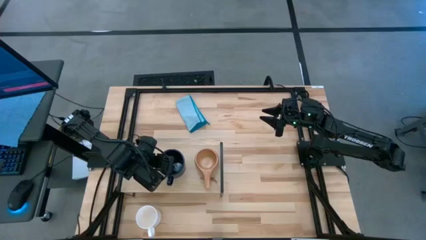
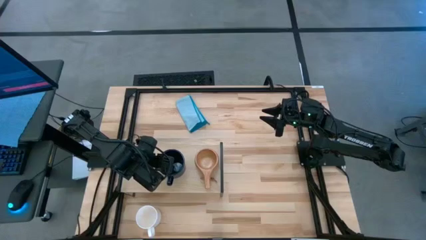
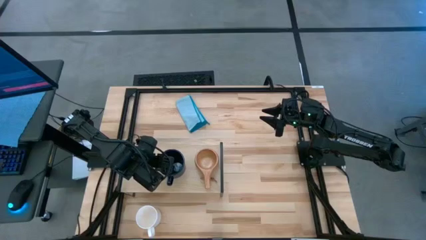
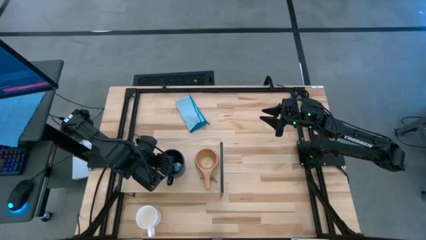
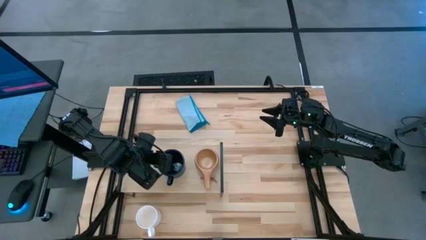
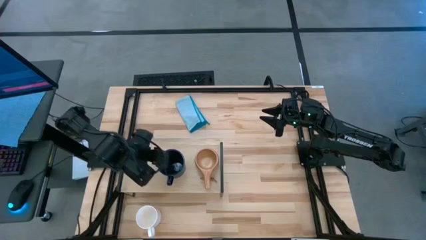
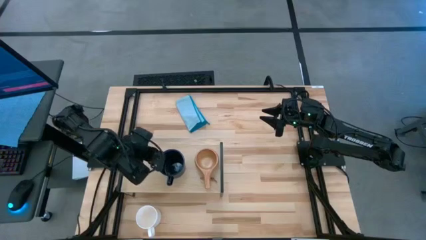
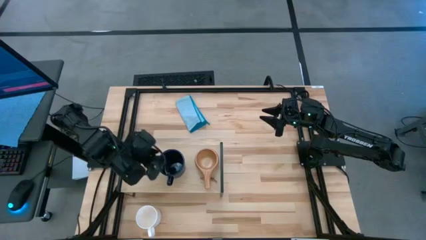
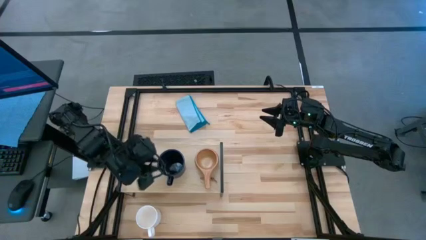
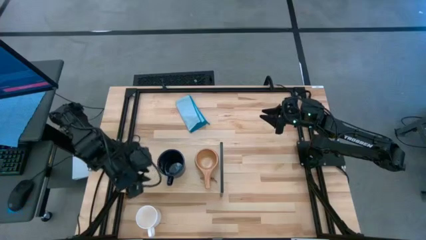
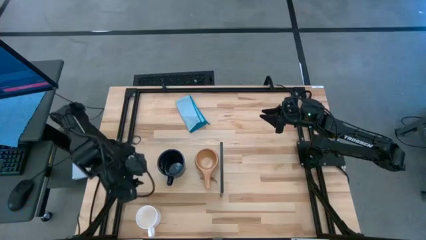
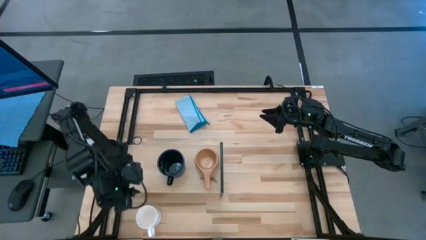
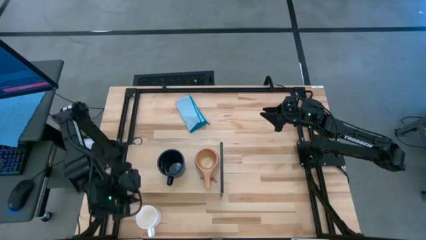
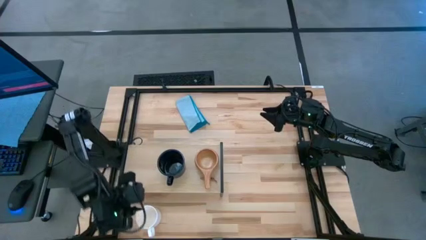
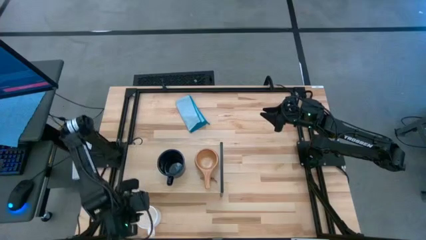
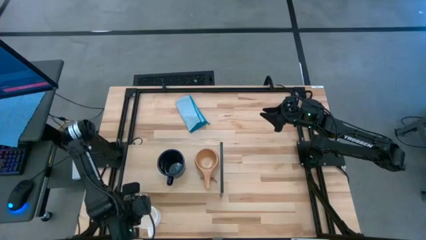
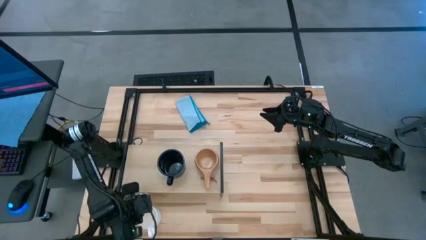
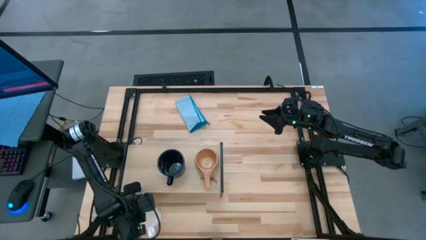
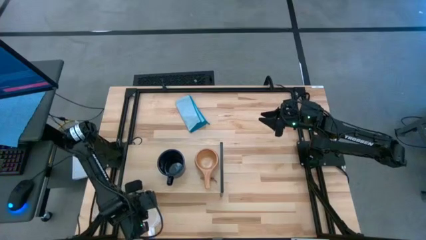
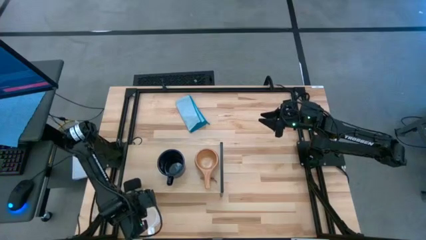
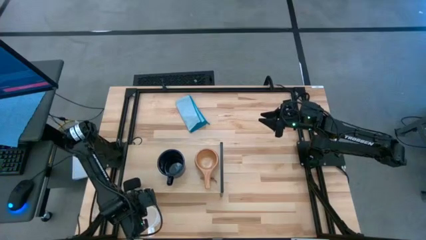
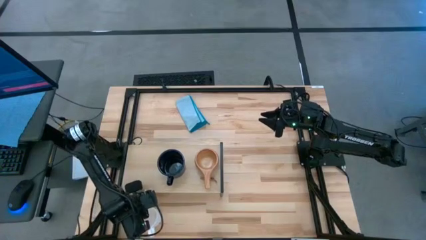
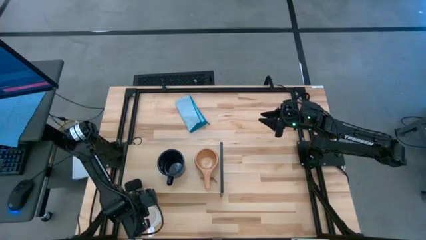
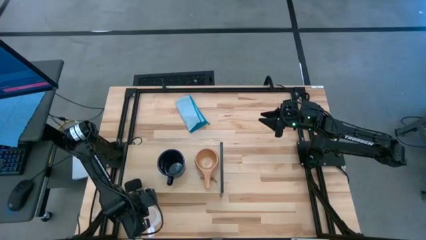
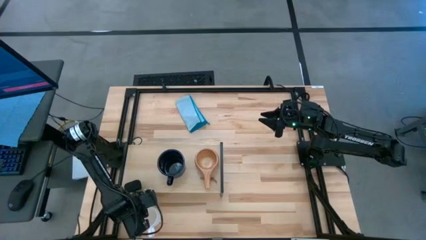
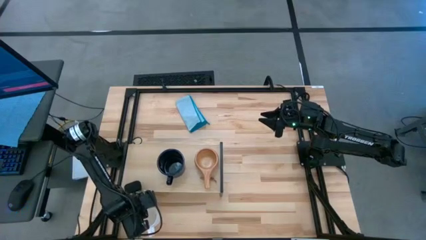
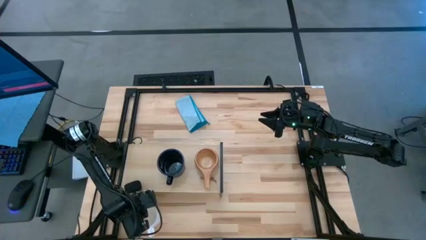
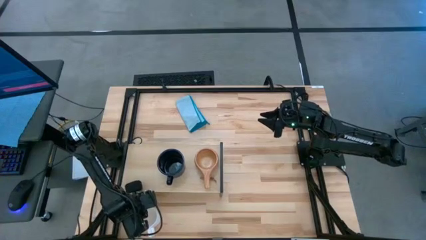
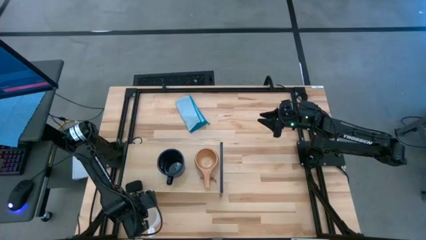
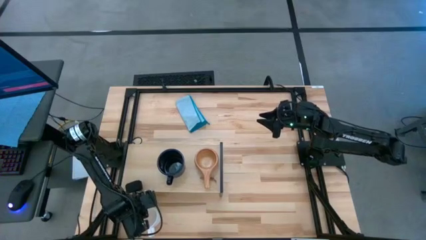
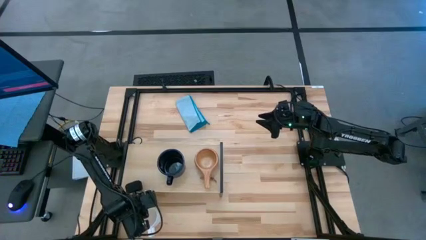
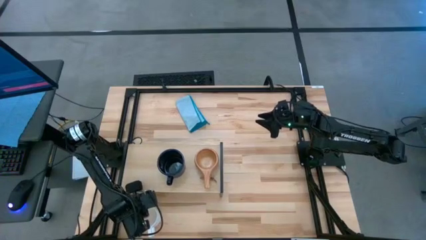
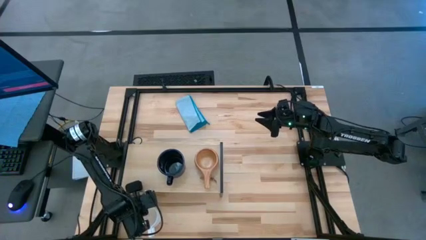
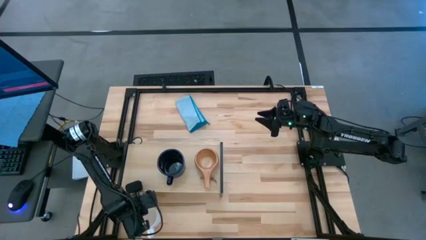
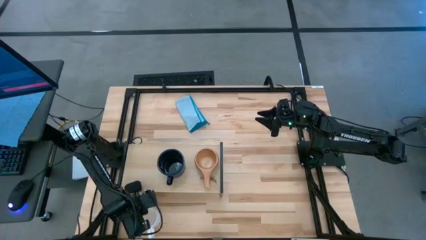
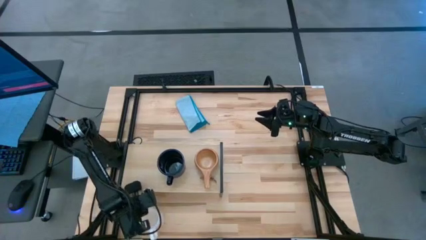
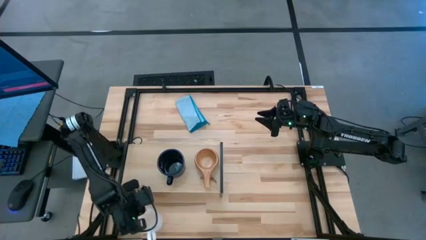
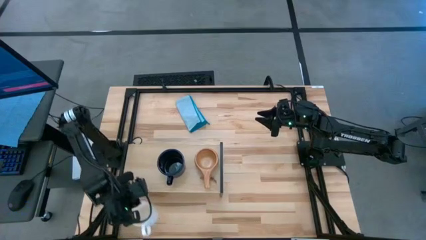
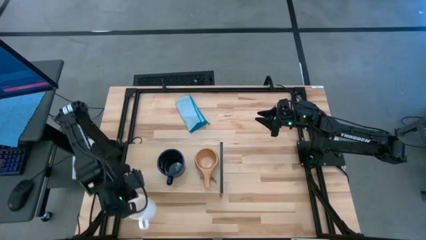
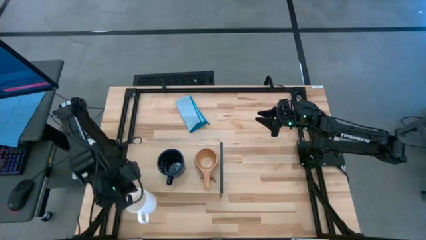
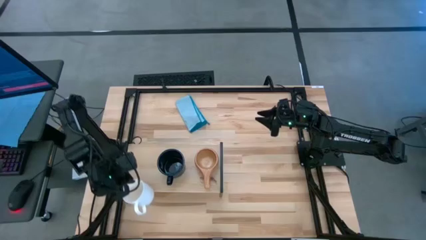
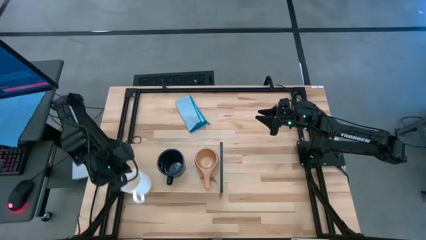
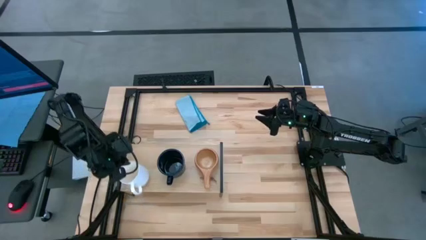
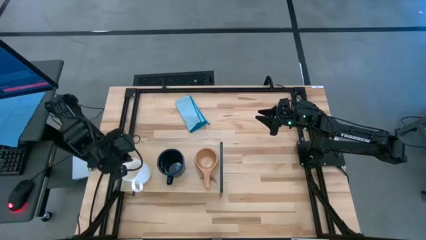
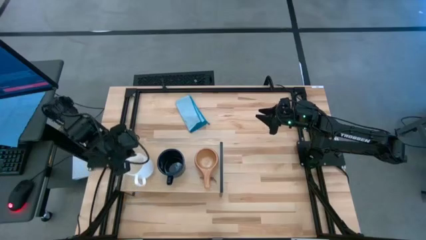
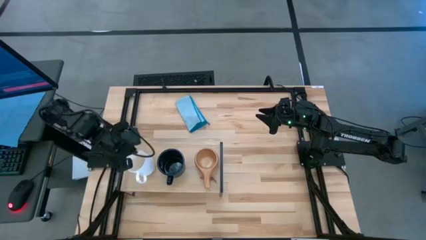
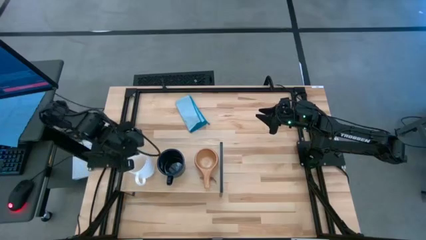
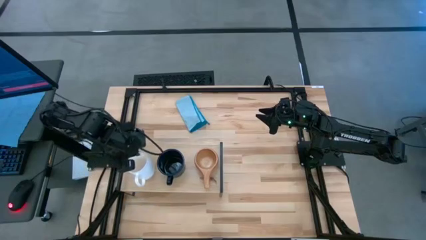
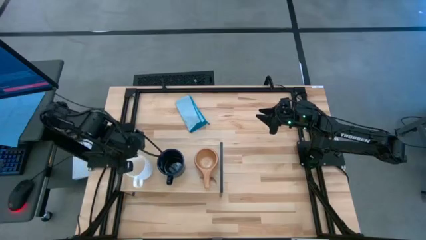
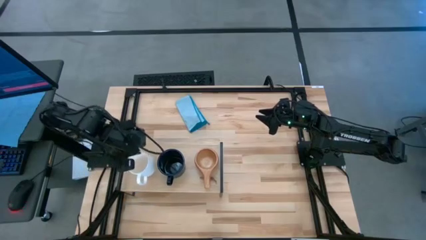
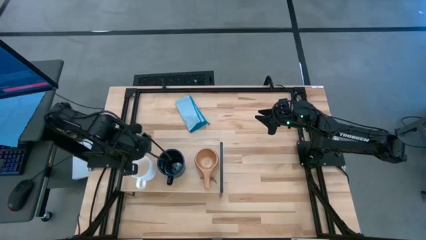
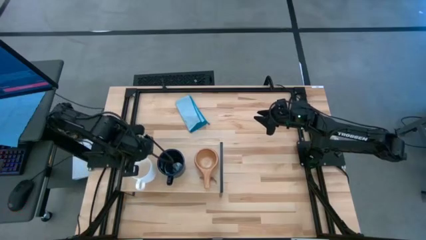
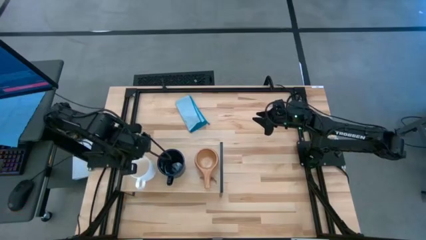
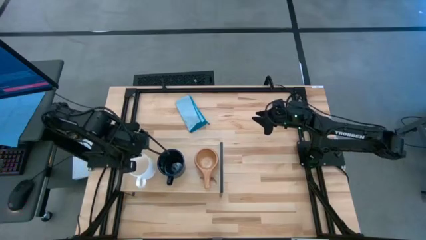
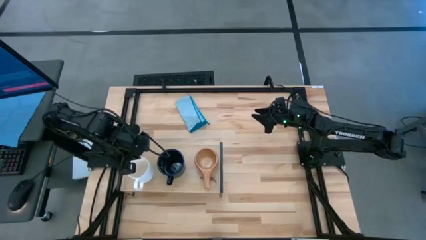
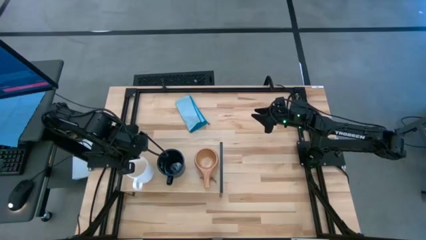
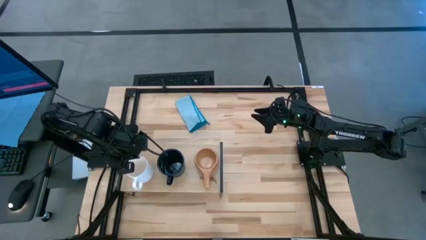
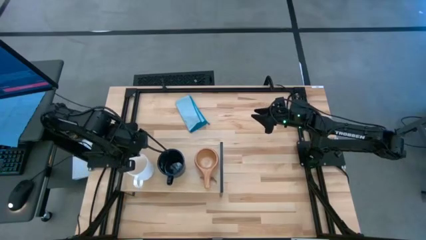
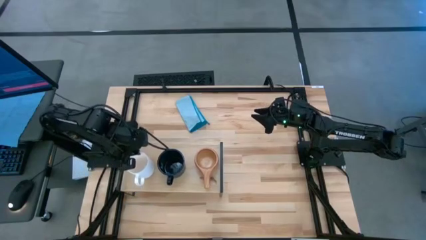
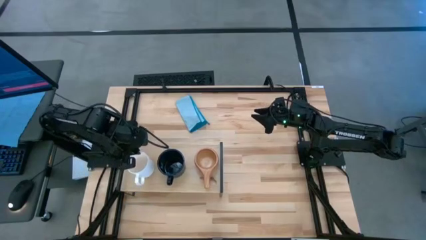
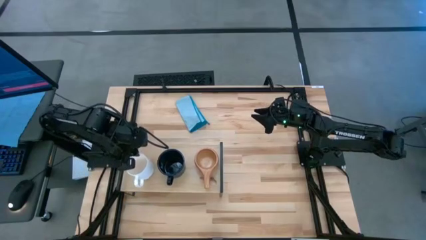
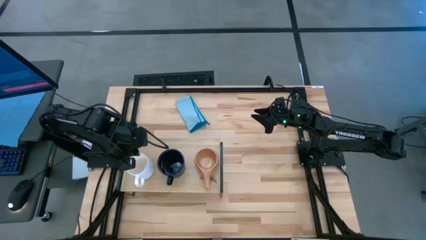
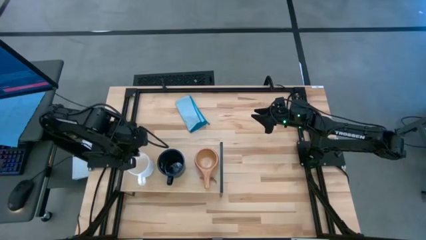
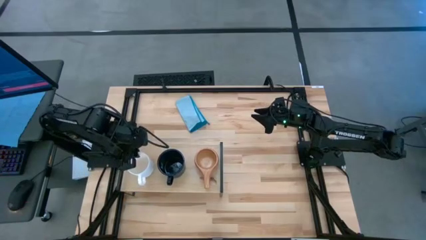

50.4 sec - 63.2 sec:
Task: Stack small to large cups/mugs on shelf
Put the white cup on the shelf
